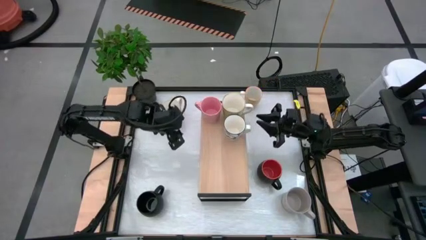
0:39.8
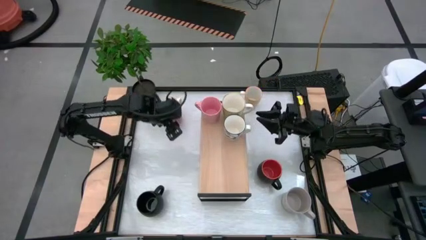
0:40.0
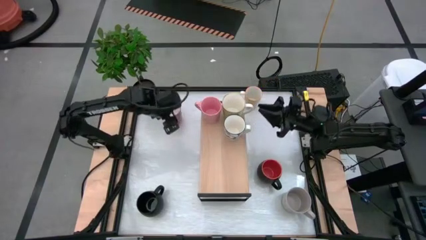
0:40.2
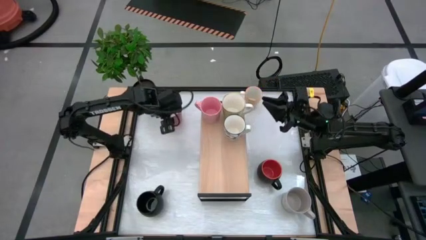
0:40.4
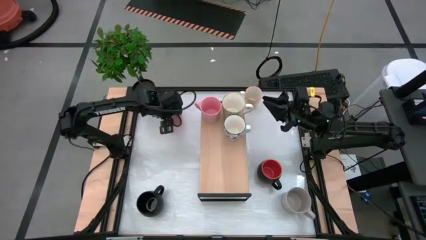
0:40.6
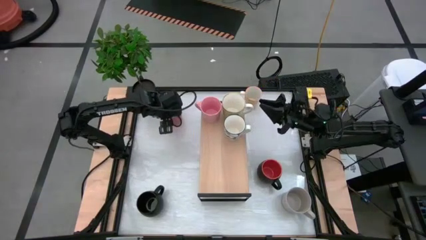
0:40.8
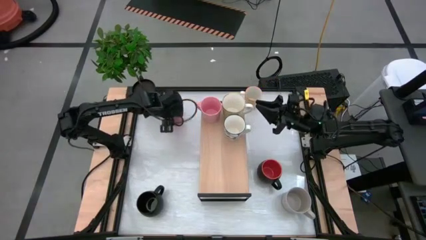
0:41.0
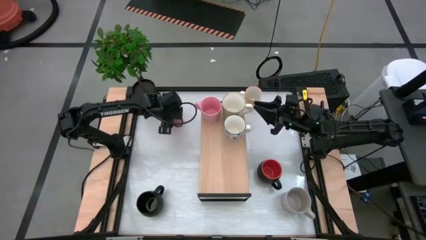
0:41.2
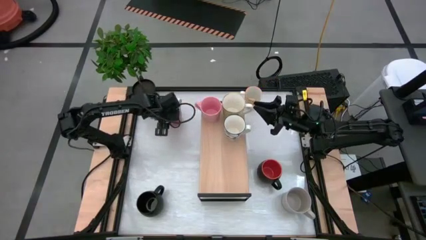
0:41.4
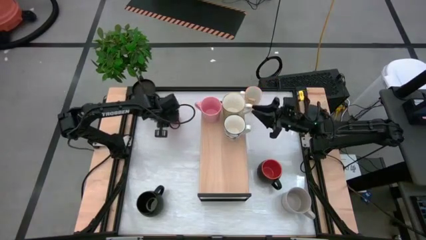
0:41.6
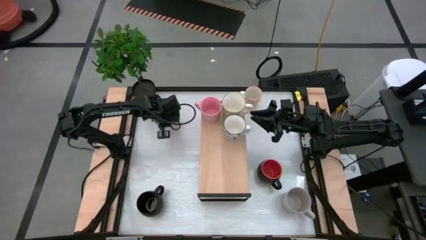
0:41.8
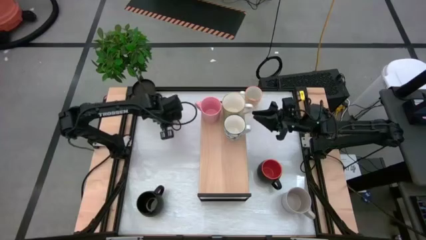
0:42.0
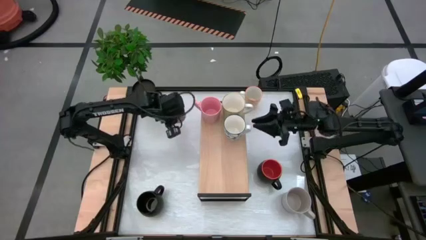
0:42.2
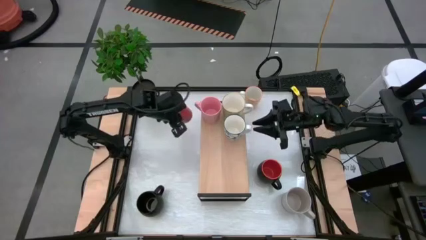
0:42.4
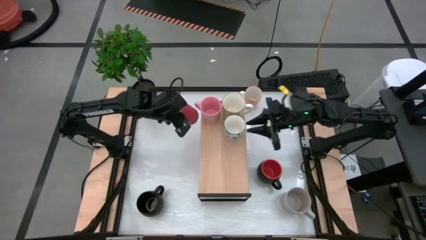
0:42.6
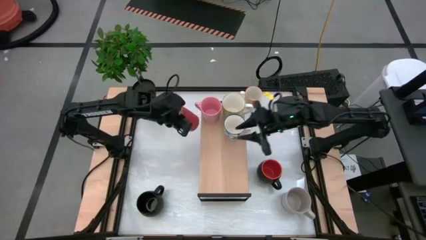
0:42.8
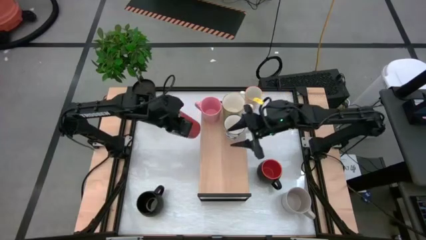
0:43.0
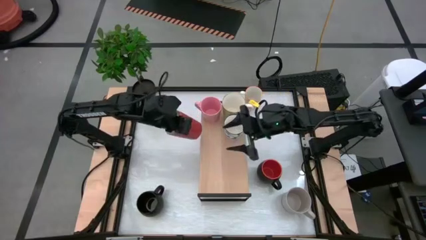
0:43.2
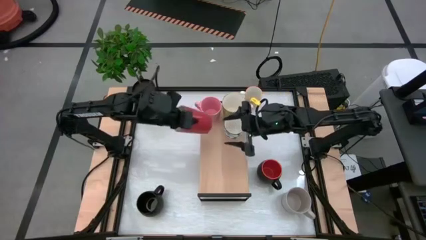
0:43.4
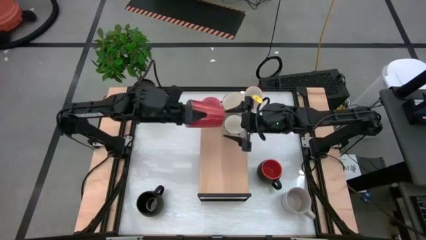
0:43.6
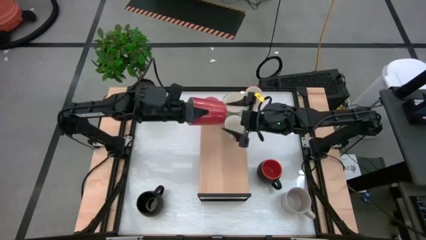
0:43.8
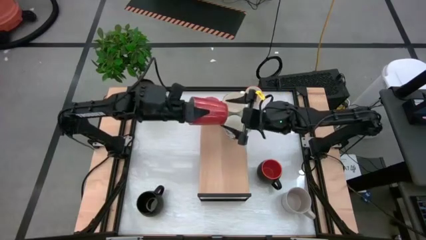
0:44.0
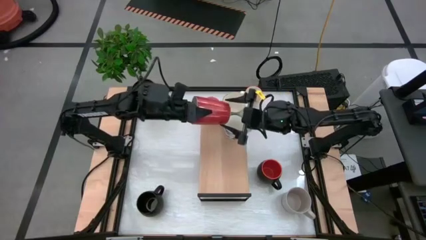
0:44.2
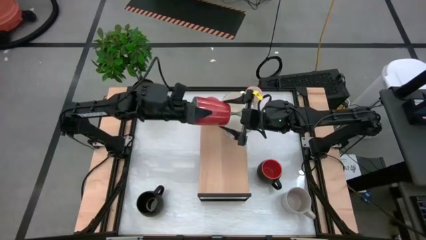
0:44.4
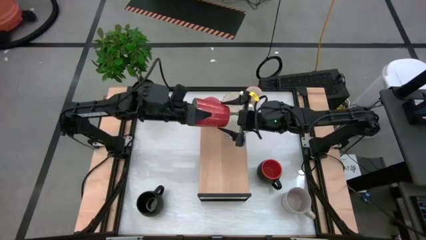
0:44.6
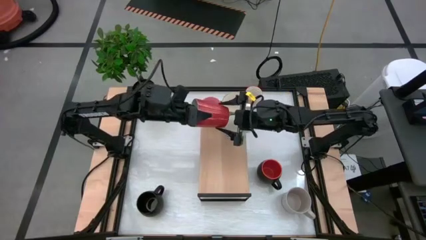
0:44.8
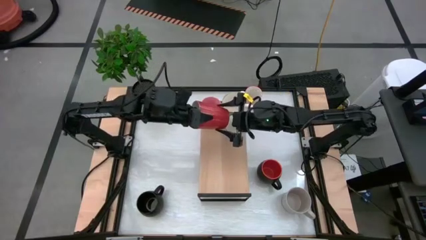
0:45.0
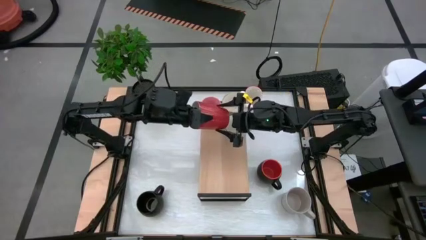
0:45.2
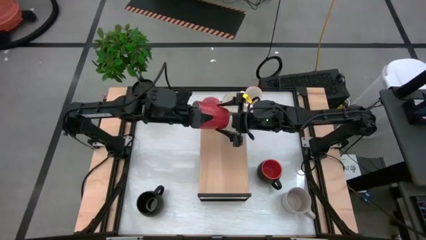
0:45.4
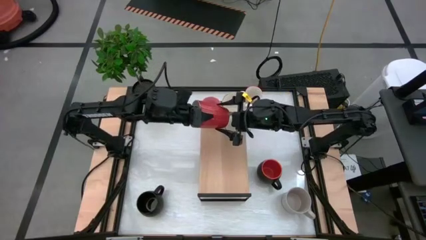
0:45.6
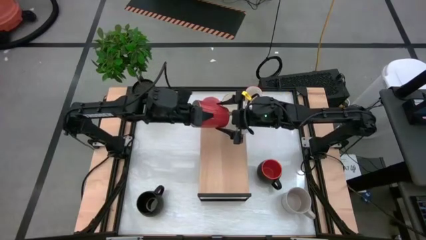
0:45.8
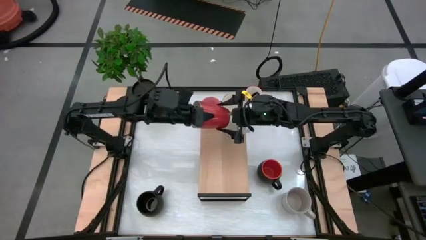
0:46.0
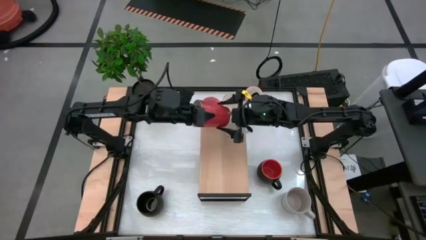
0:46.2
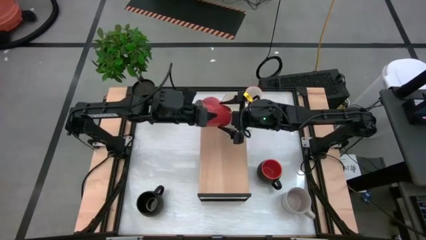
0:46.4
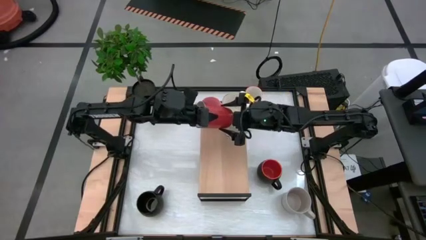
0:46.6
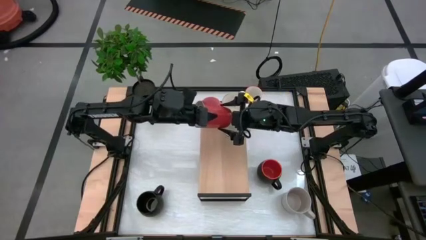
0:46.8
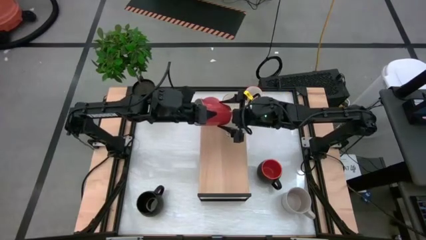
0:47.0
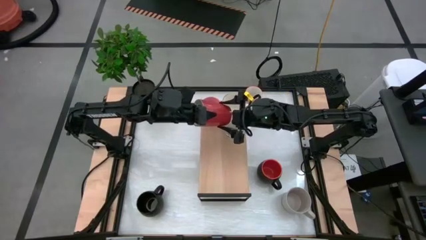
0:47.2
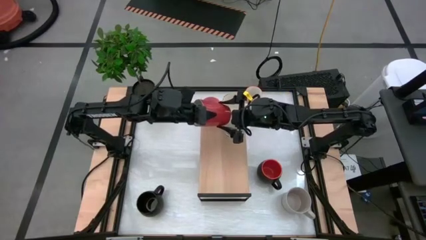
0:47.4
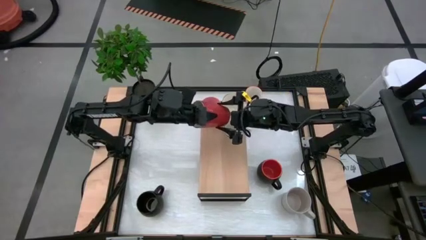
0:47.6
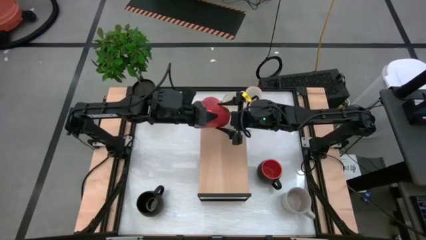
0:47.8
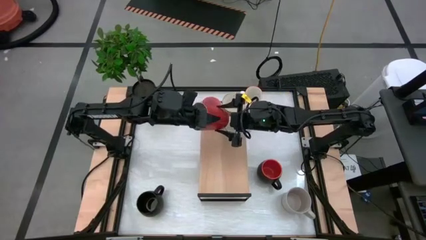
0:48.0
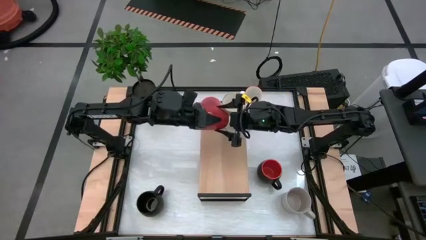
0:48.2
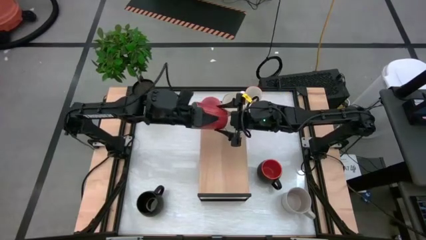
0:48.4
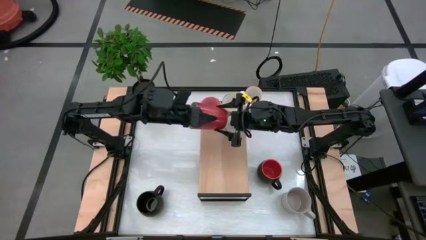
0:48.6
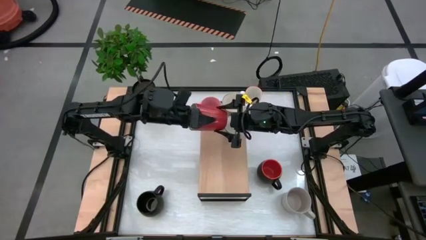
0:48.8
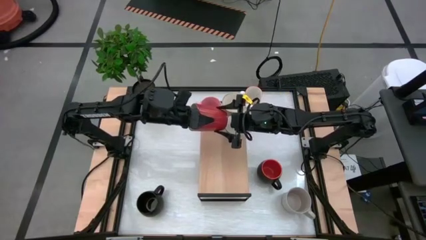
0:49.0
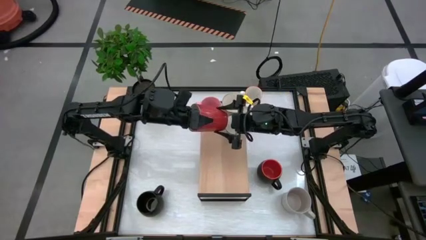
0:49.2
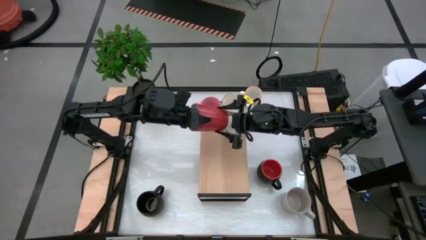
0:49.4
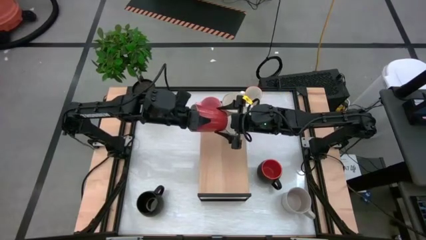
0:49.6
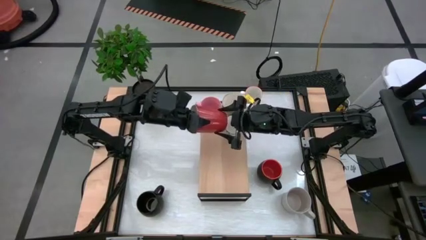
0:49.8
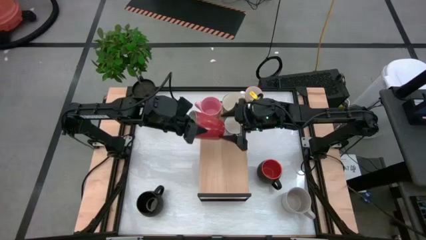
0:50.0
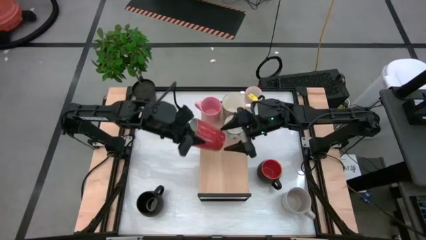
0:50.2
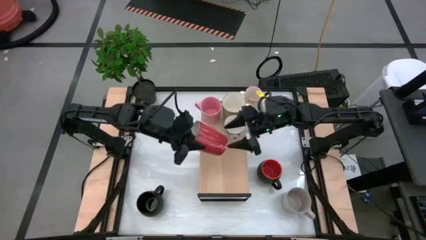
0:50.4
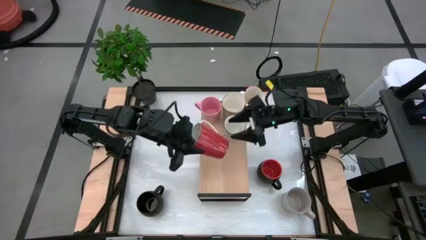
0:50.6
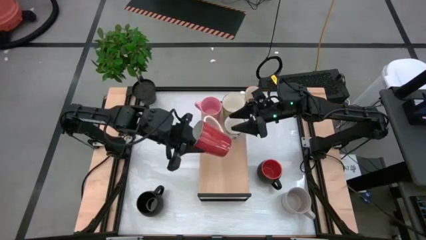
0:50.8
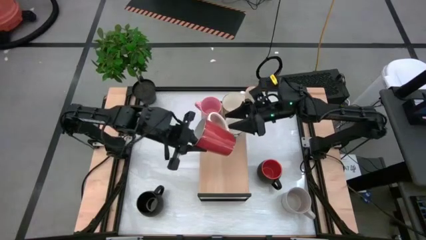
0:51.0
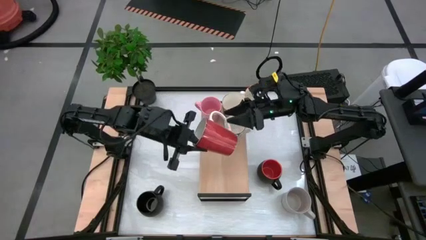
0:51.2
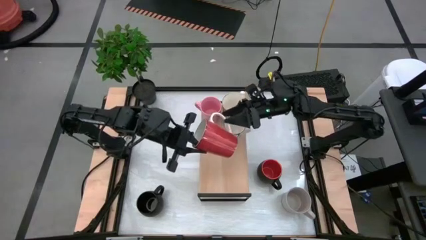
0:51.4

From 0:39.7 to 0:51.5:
Task: Place coffee mugs
Put the orange mug on the shelf
